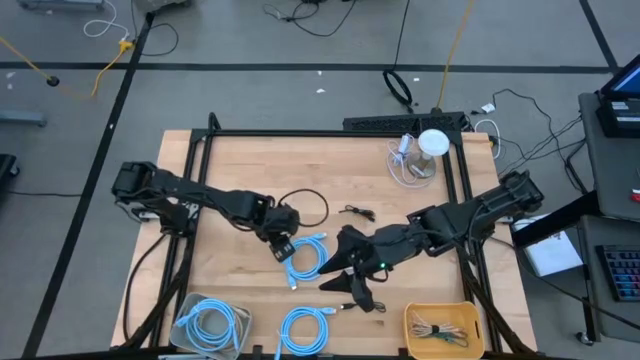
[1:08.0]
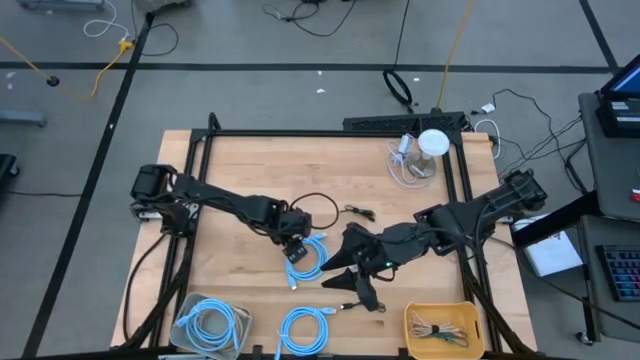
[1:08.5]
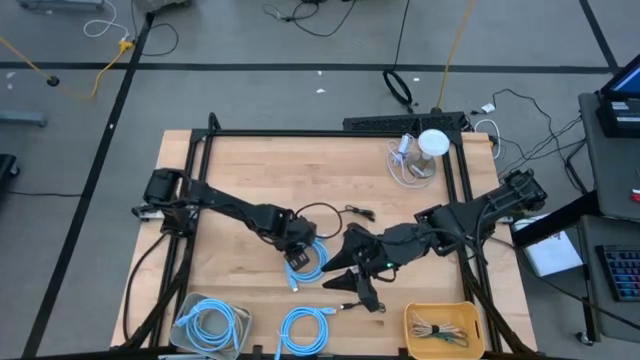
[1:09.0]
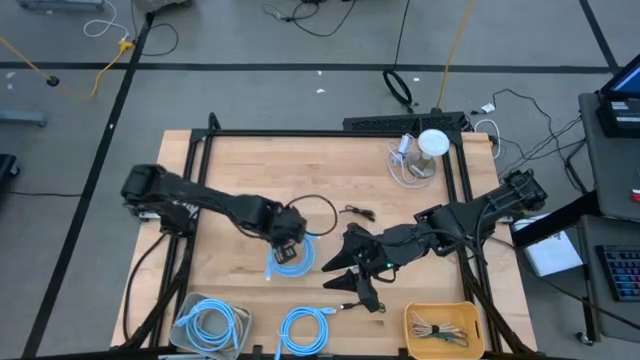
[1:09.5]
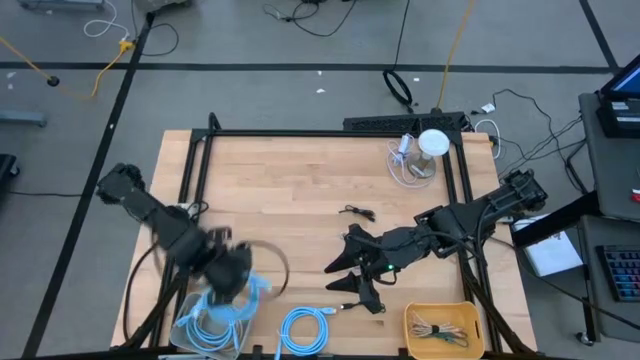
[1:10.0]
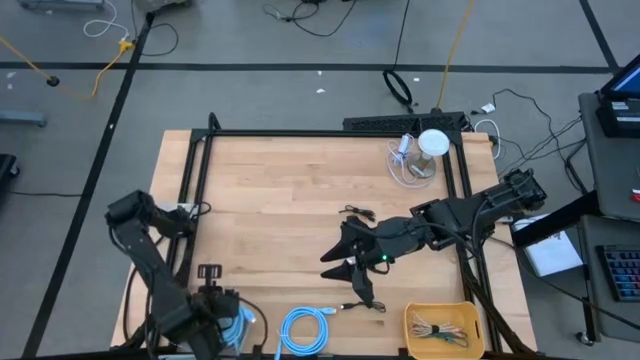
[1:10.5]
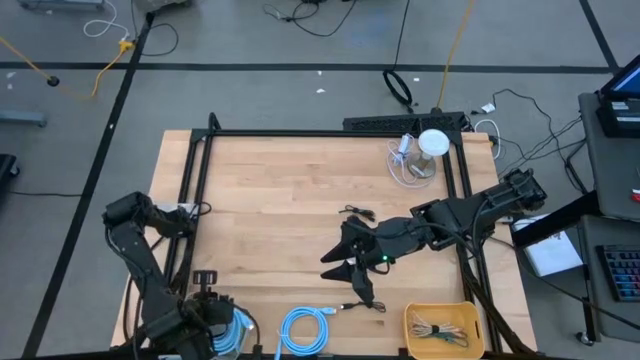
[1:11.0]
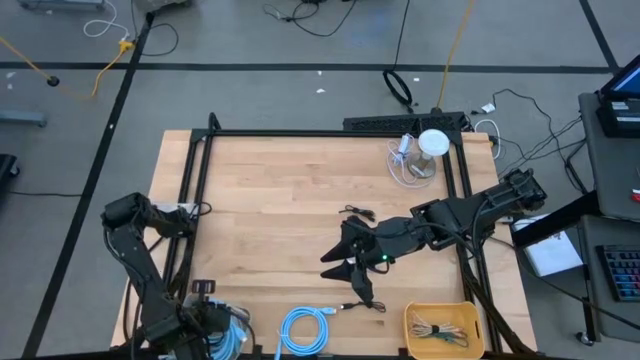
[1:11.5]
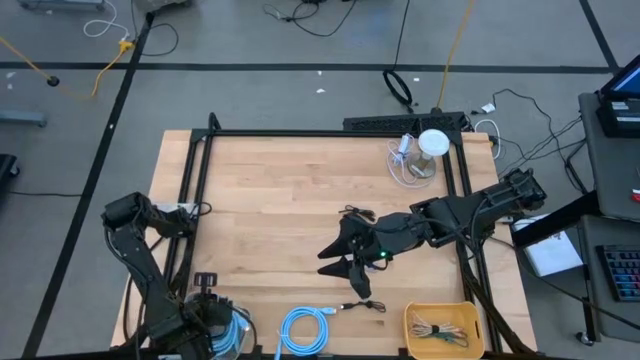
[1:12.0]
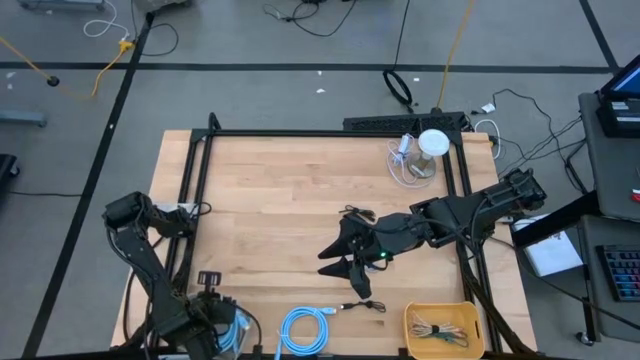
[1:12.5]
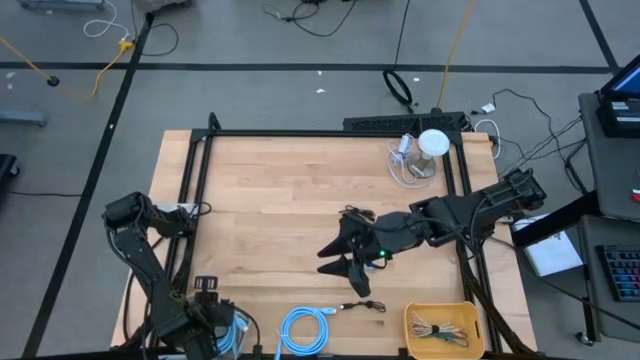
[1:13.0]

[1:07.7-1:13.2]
Task: Pick & Place USB Port
Put the top light blue HDMI cable into the gray bin

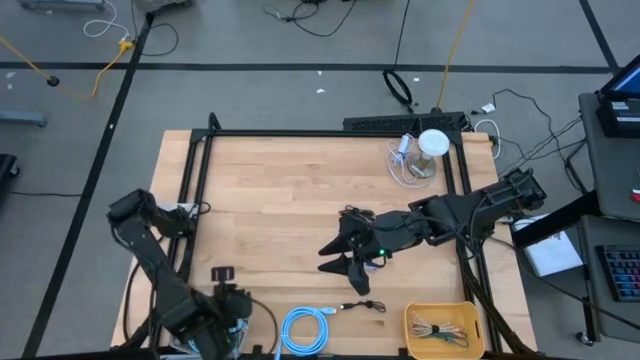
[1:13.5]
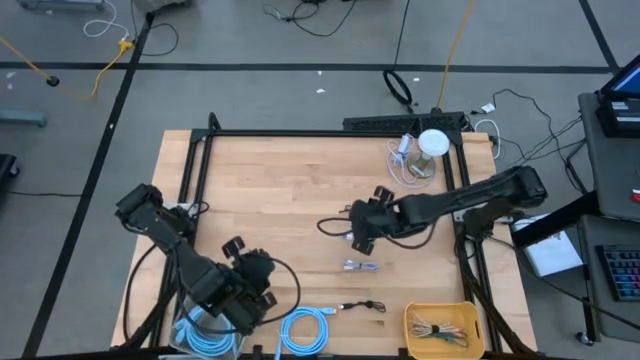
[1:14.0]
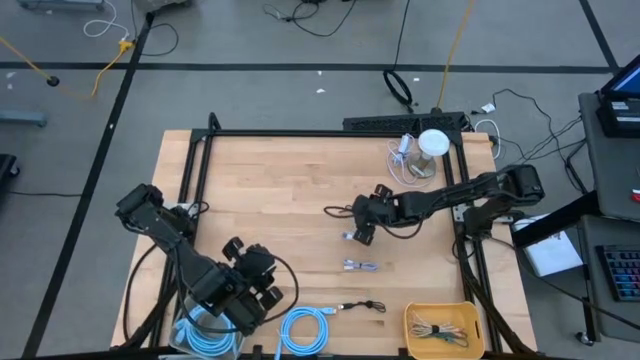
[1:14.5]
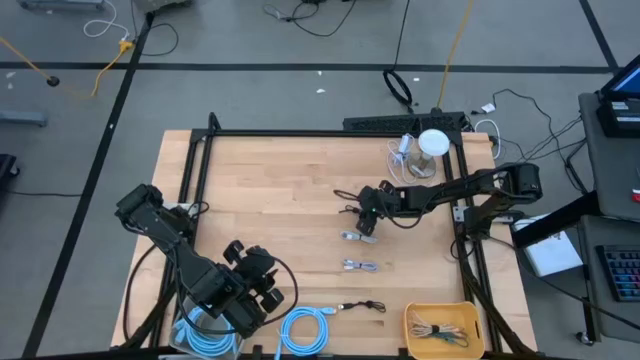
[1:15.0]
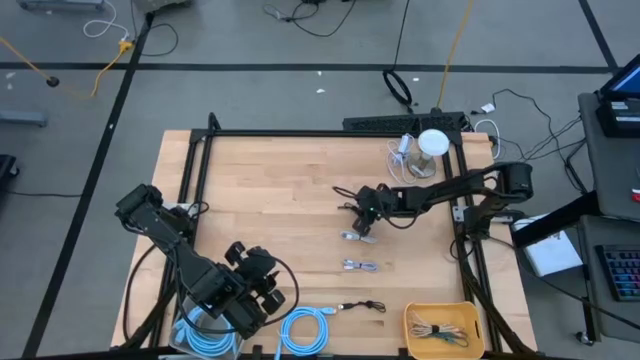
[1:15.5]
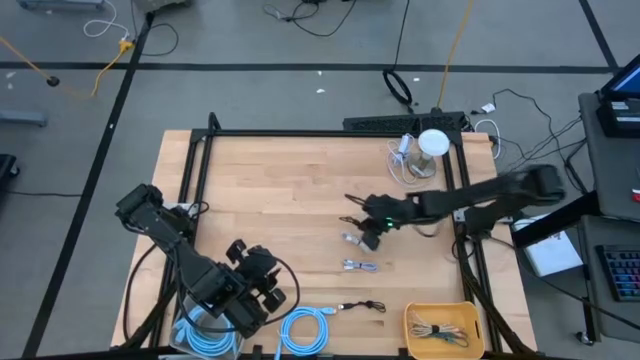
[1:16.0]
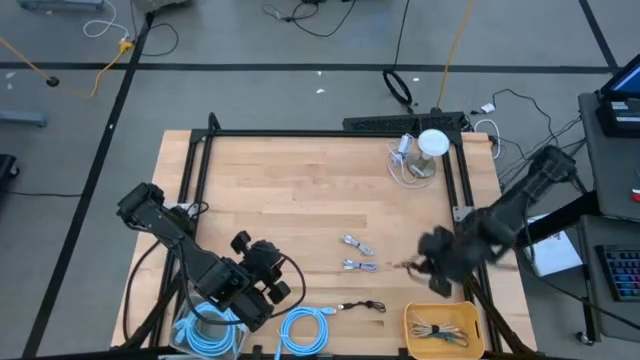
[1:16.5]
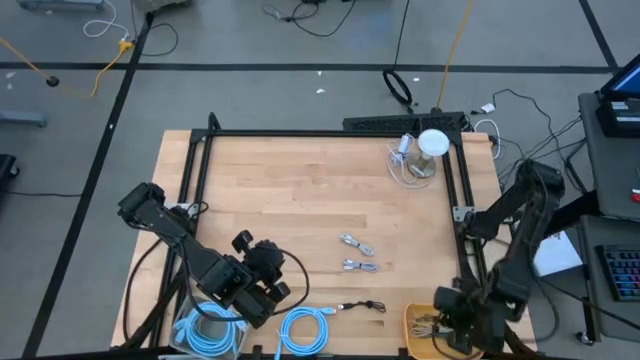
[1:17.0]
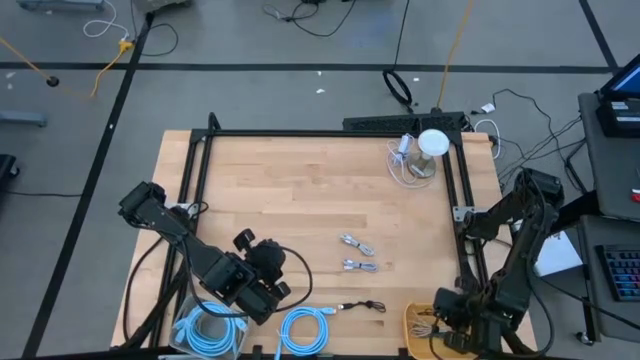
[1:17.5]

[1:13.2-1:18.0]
Put the top black charger cable into the yellow bin

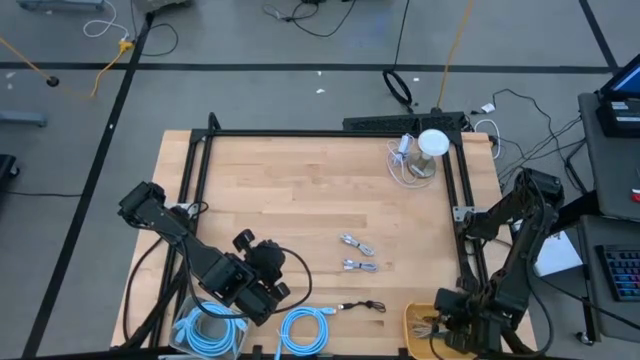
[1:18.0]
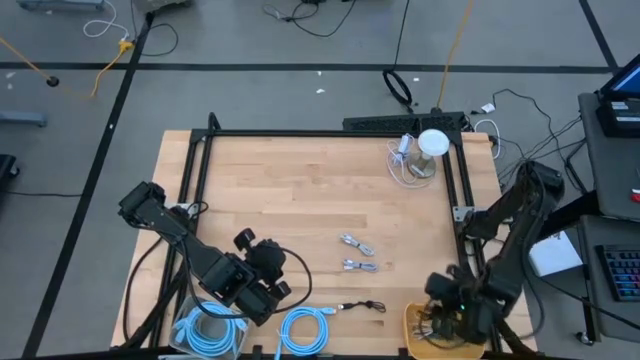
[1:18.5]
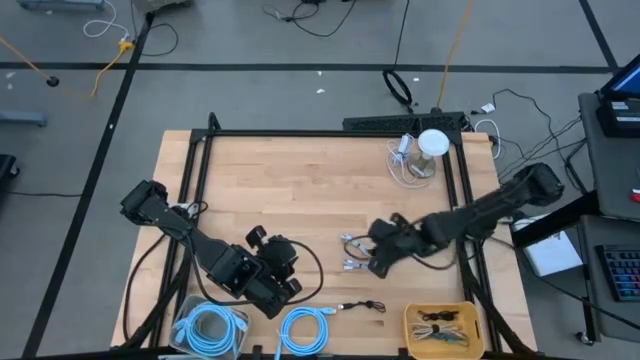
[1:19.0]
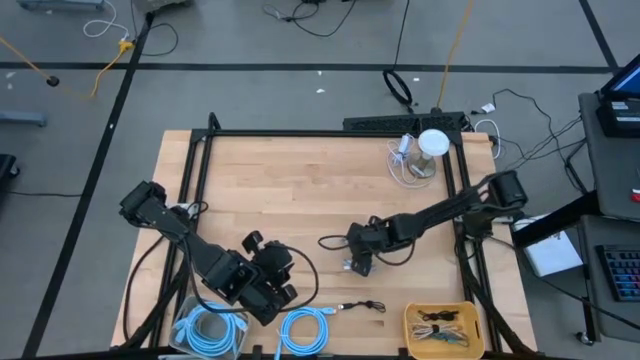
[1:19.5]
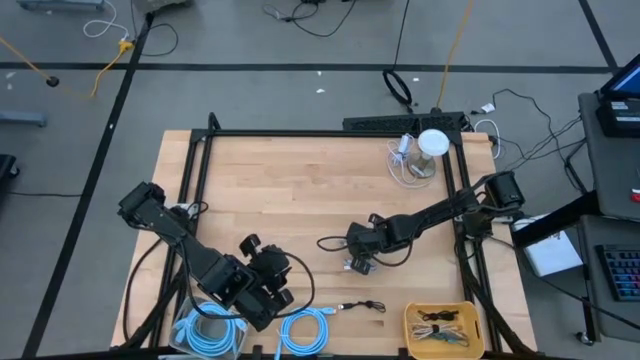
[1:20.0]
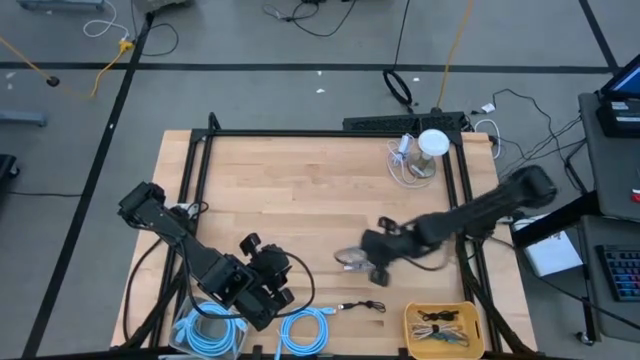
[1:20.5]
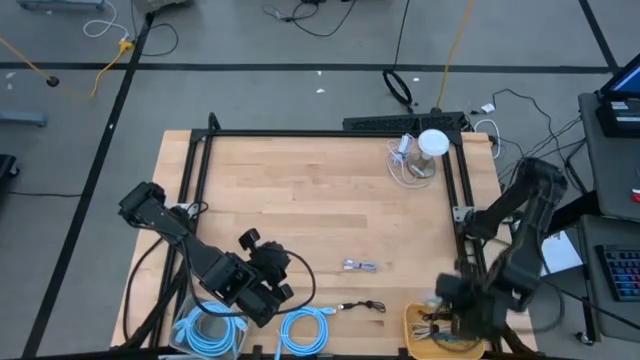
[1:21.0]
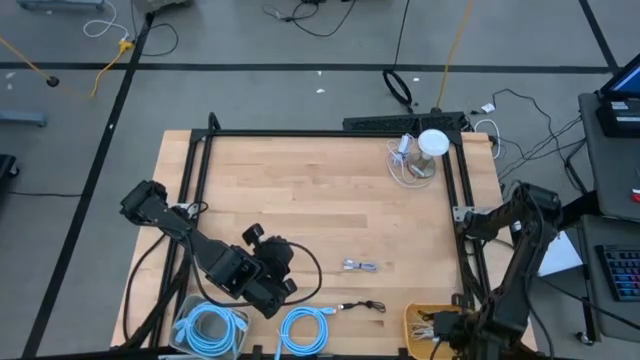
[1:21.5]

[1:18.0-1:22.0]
Put the white charger cable into the yellow bin

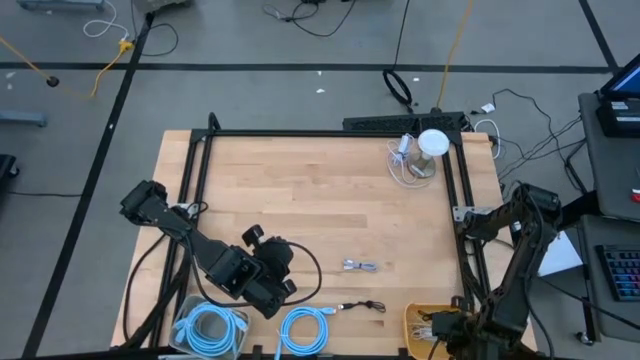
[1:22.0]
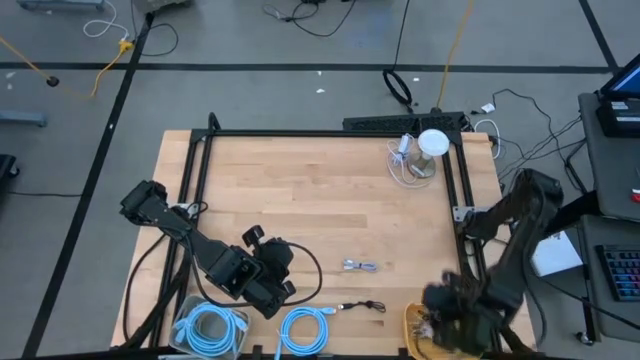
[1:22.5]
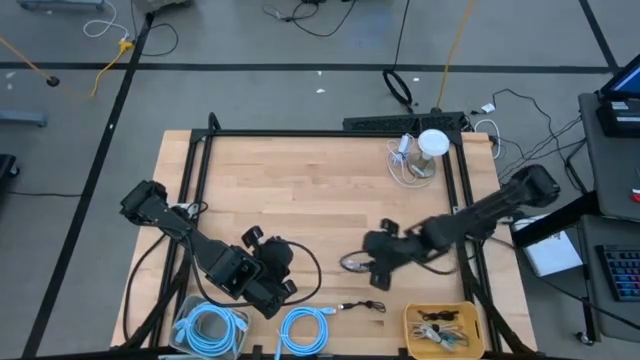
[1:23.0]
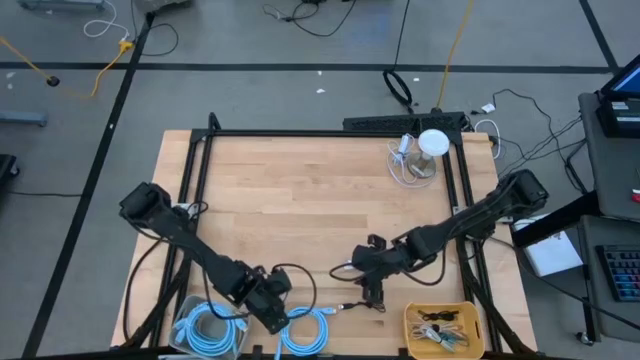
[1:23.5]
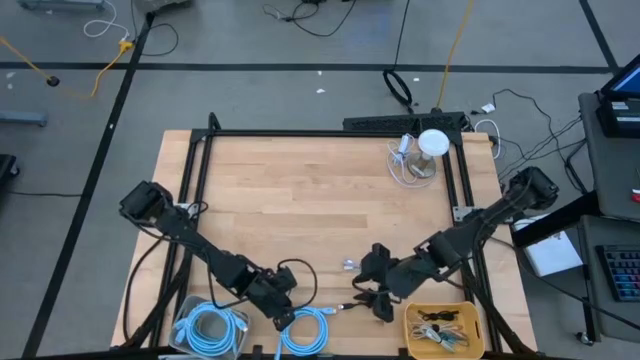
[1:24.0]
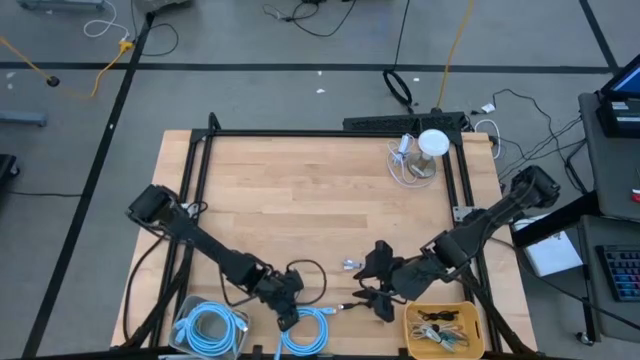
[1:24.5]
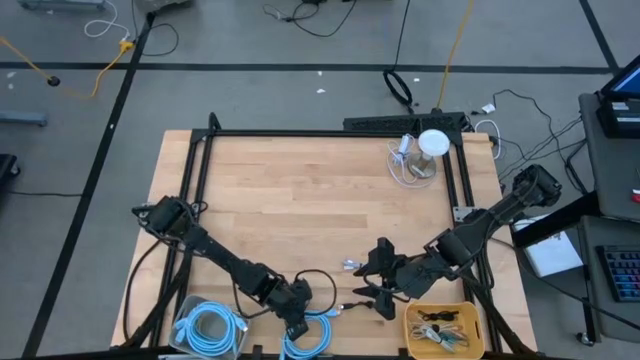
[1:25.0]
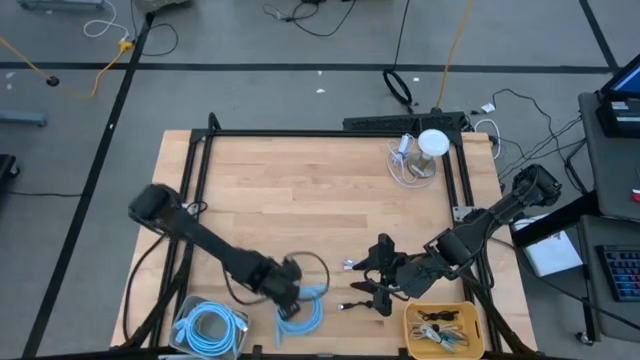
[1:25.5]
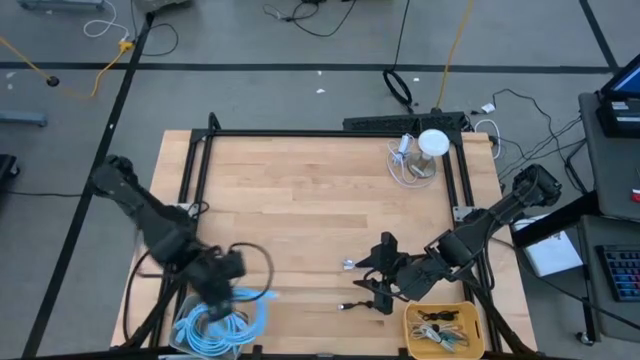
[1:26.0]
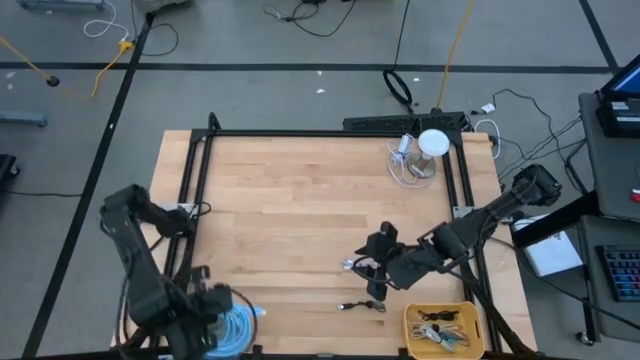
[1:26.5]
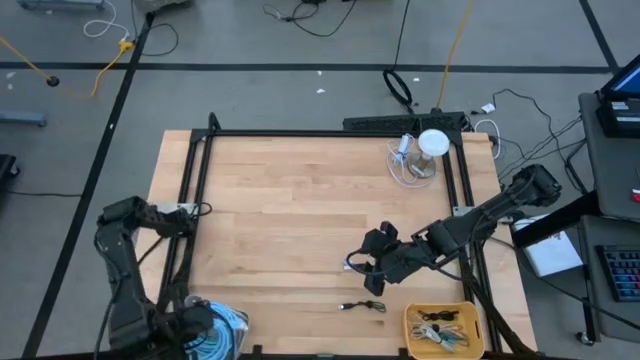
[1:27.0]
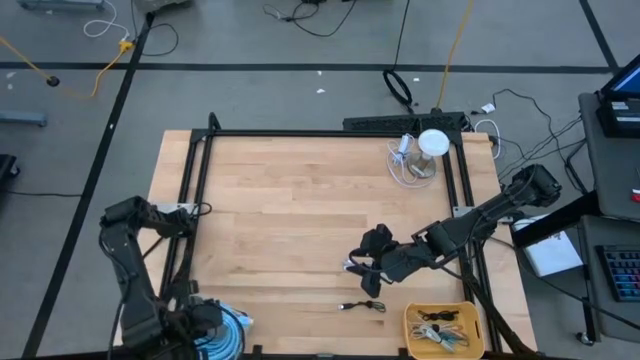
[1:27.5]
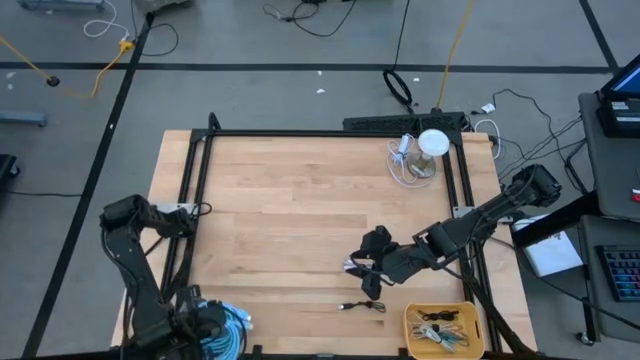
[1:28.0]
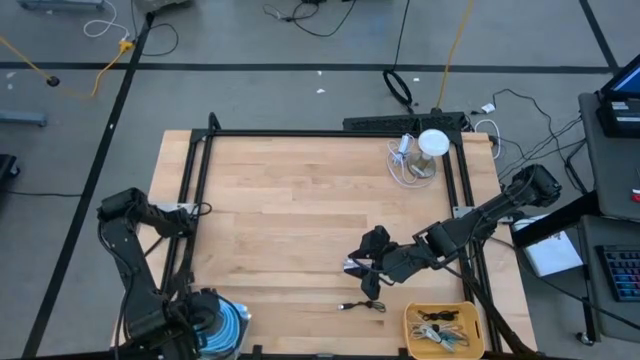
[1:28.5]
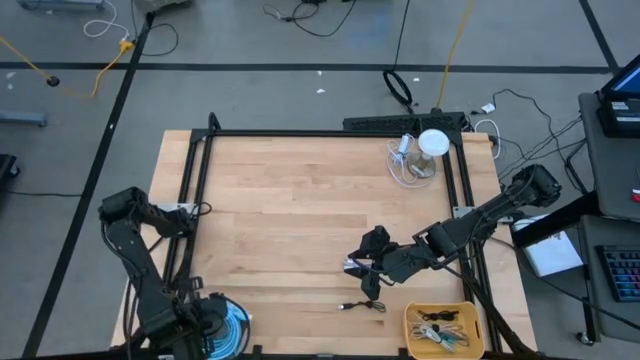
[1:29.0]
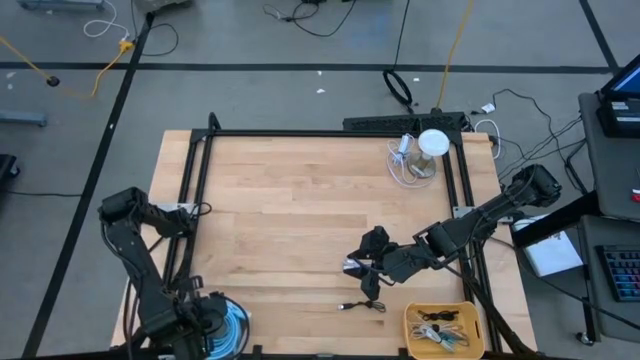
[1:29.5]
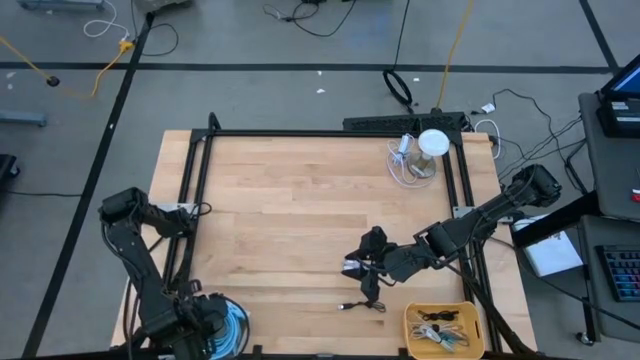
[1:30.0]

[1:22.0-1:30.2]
Put the light blue HDMI cable into the gray bin
